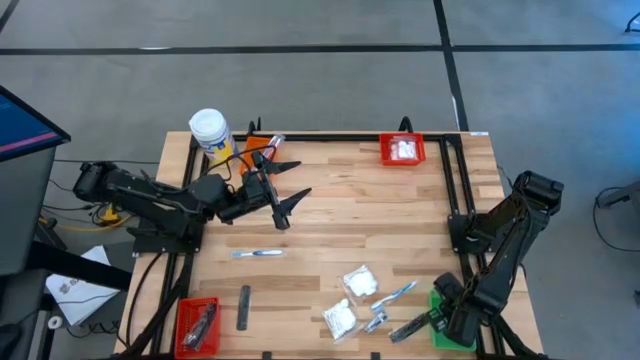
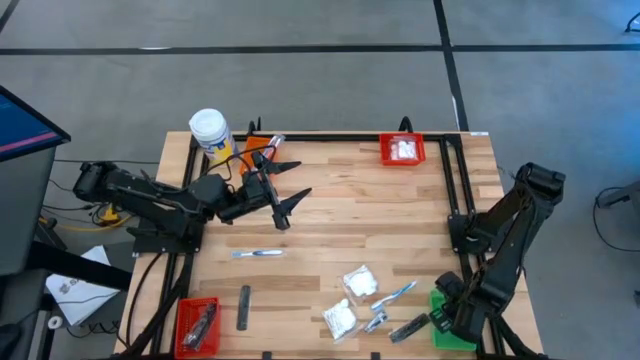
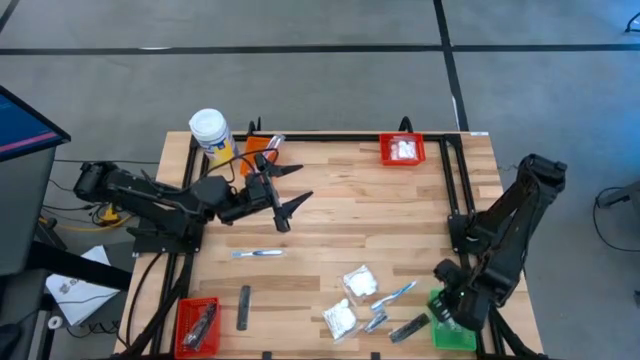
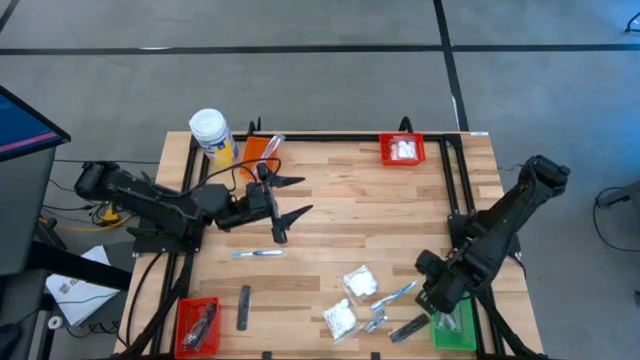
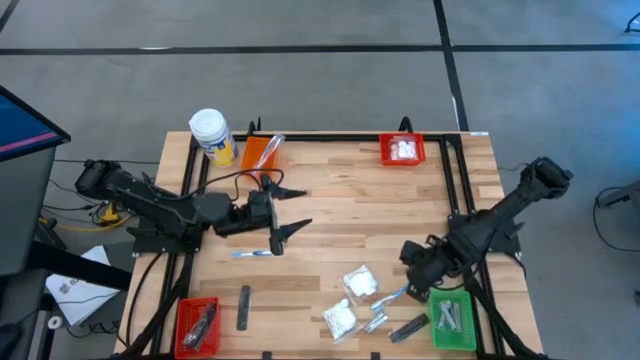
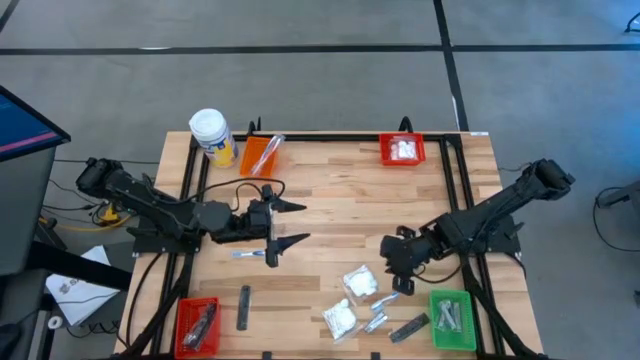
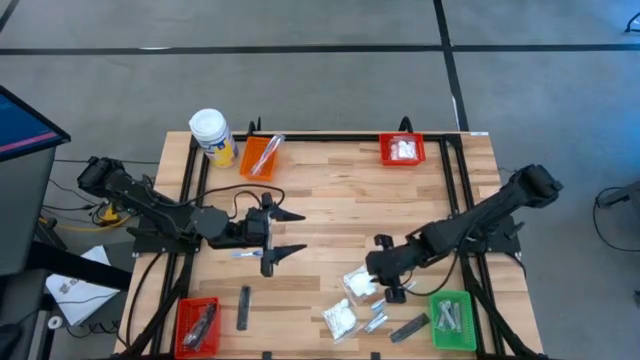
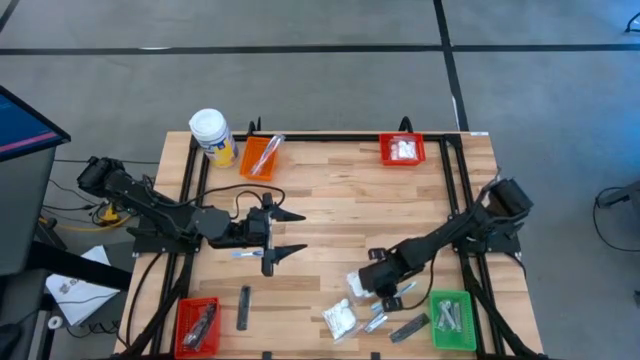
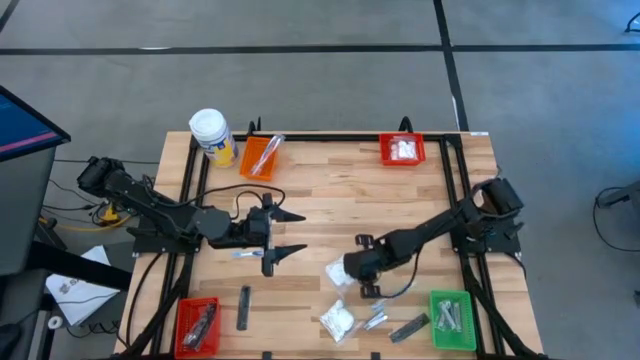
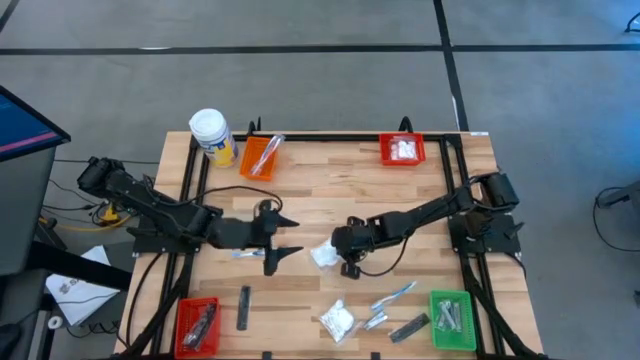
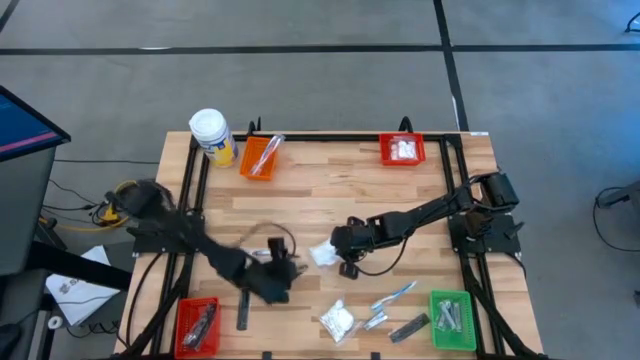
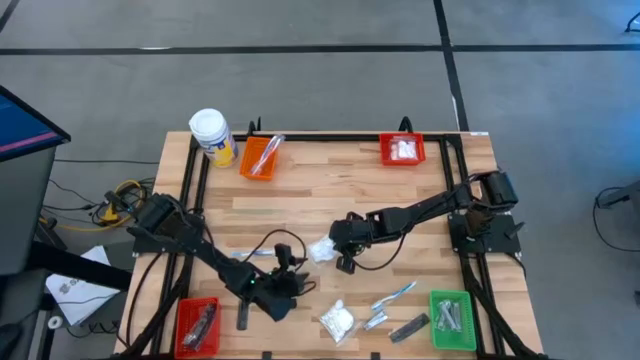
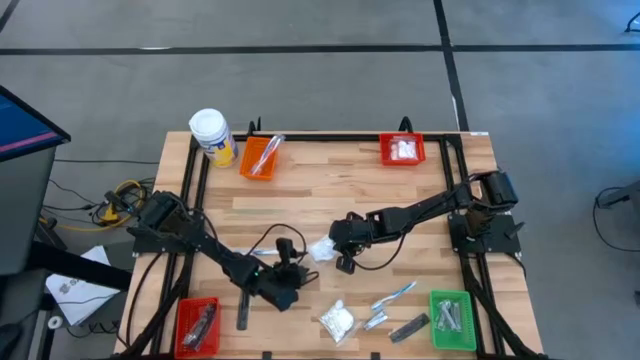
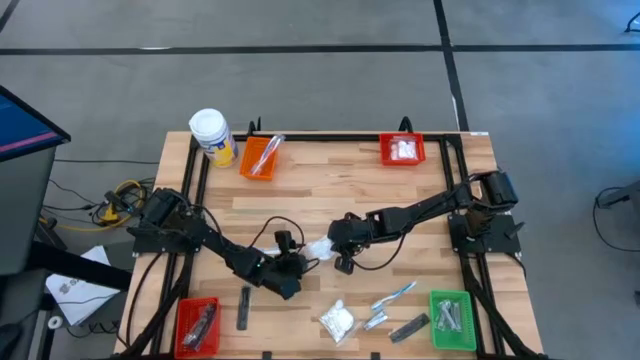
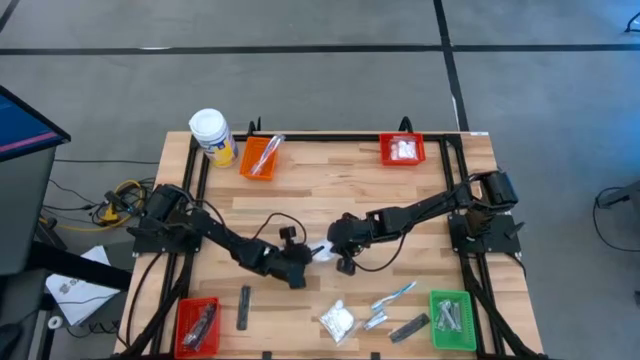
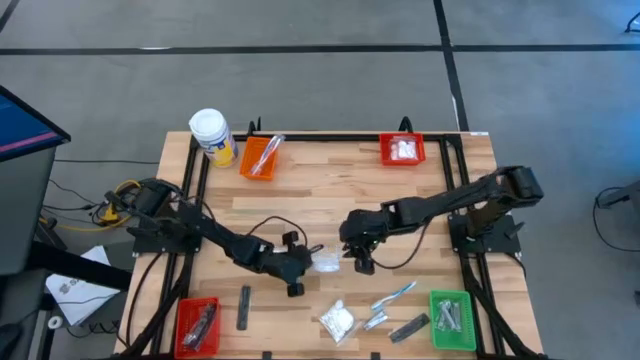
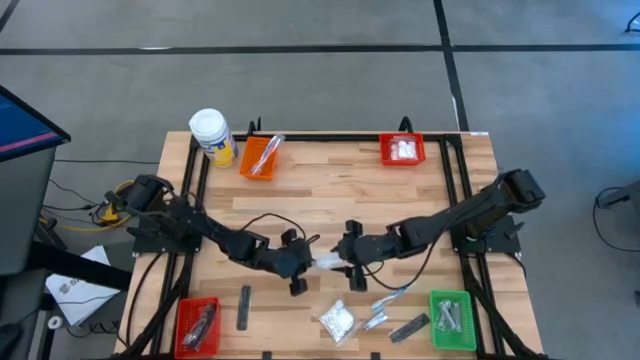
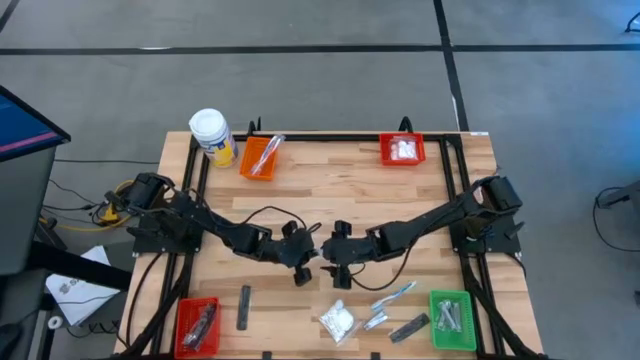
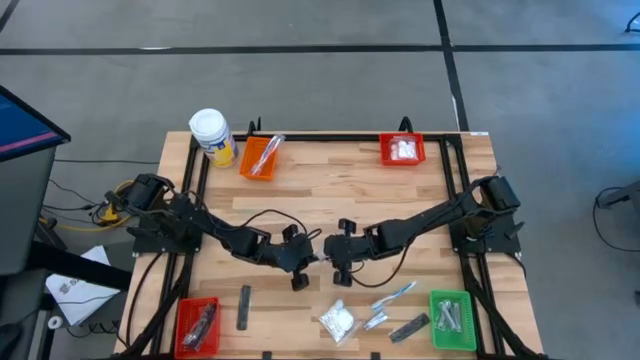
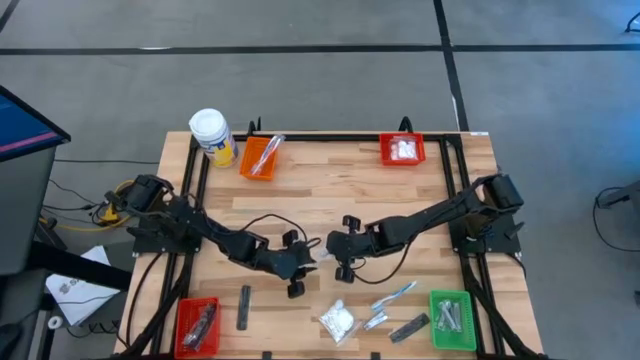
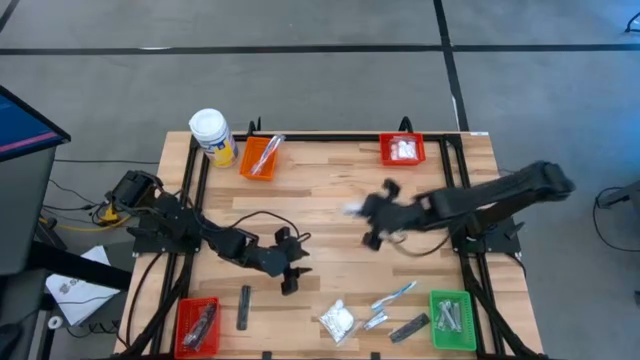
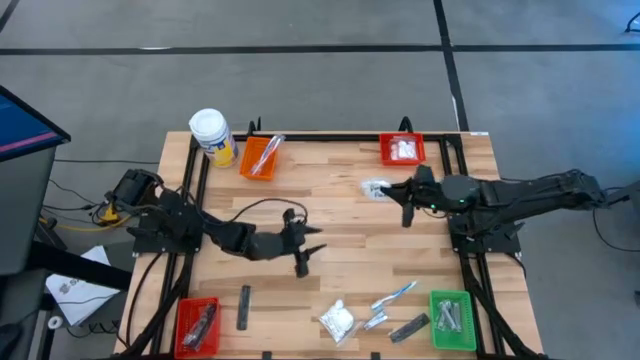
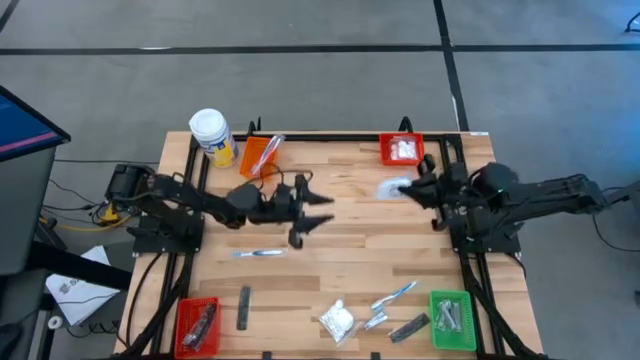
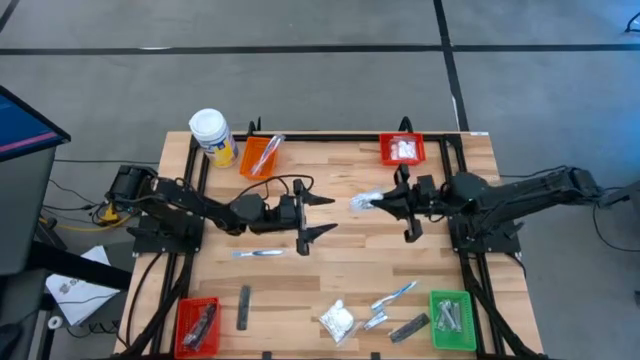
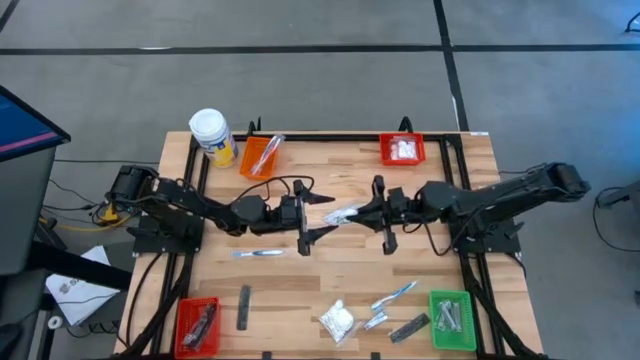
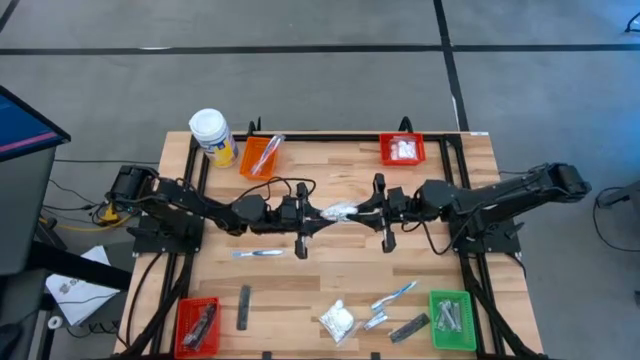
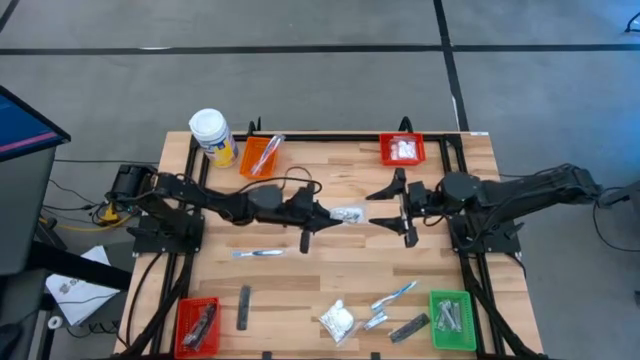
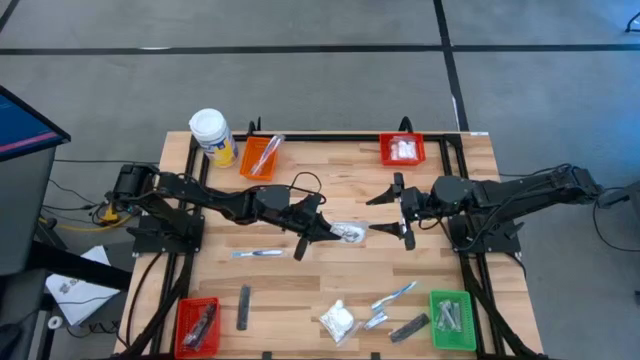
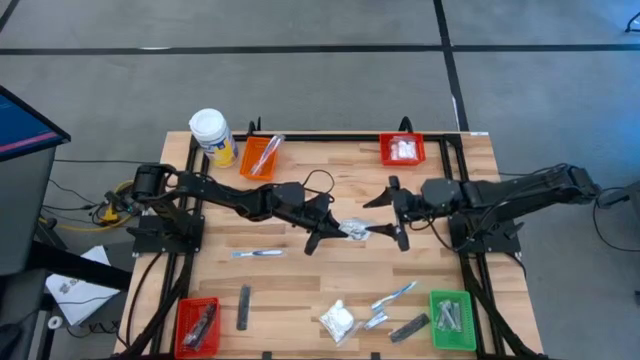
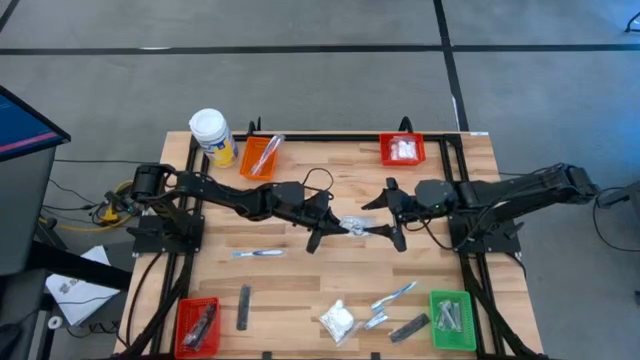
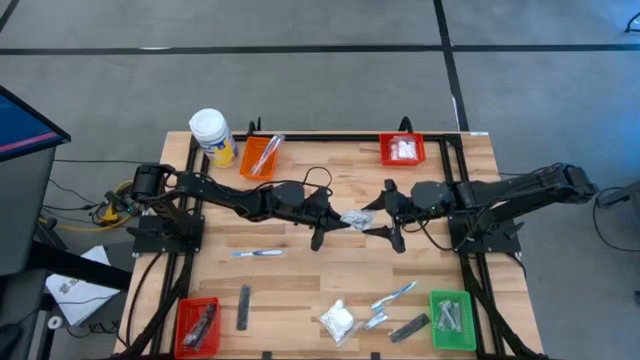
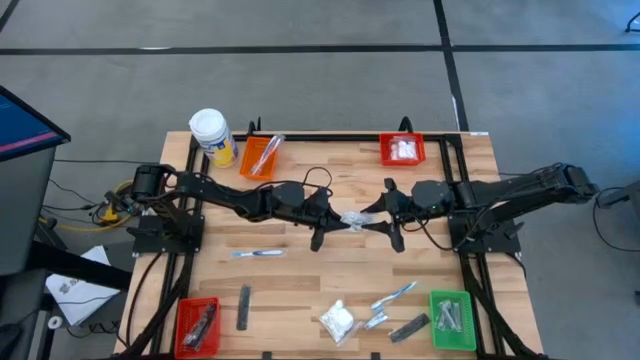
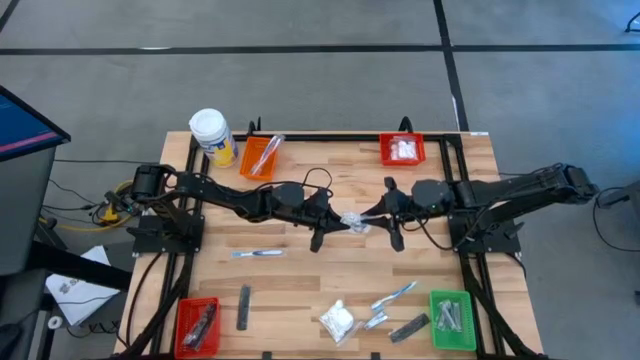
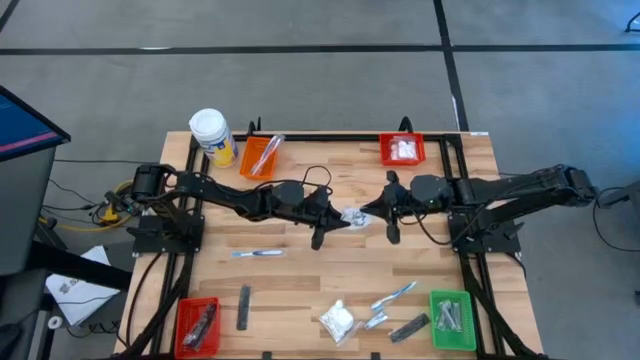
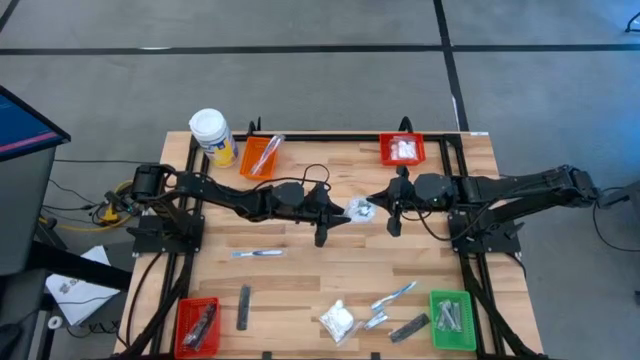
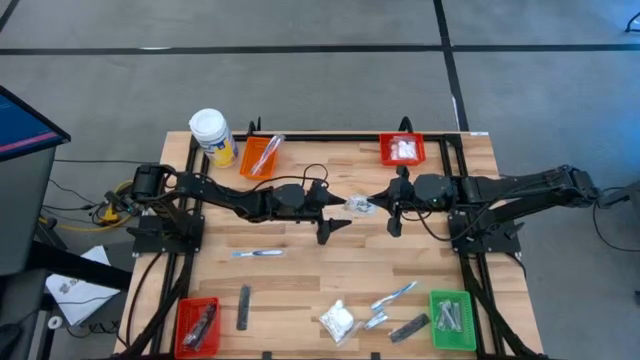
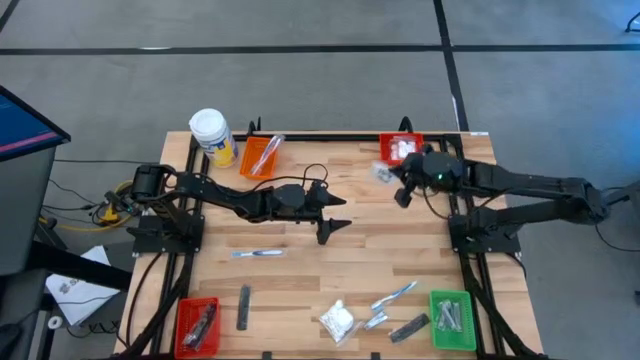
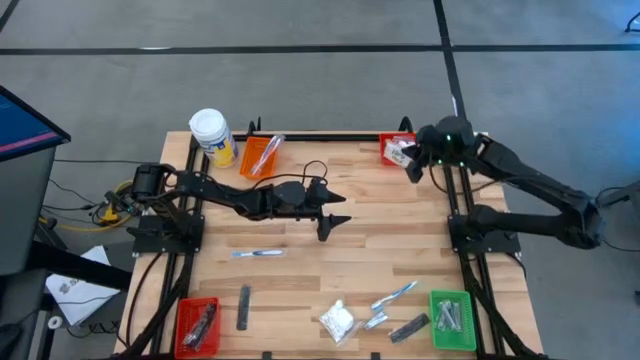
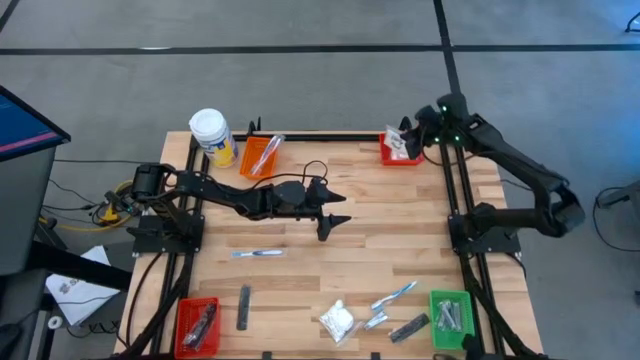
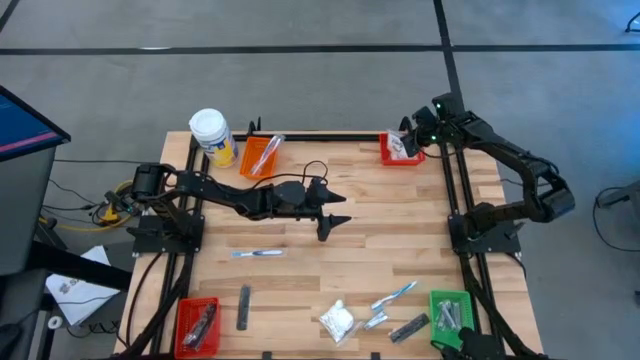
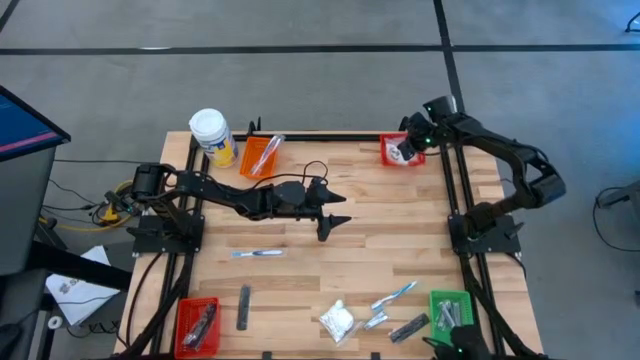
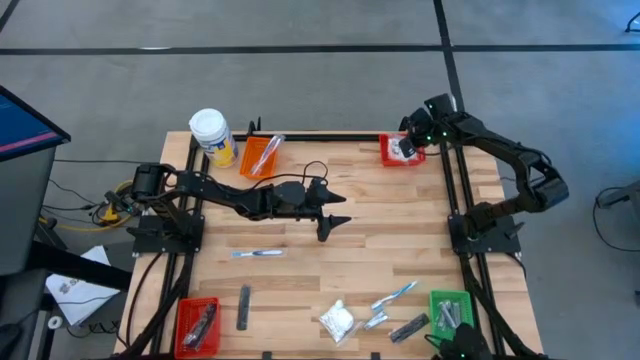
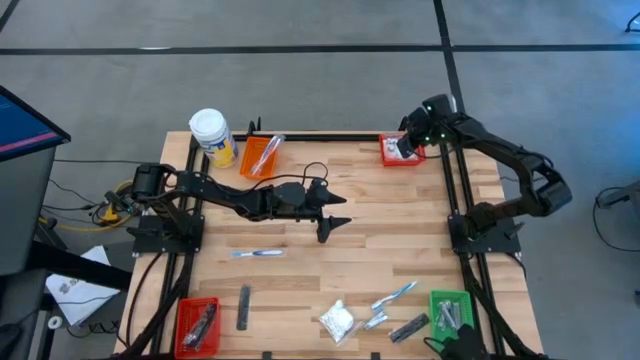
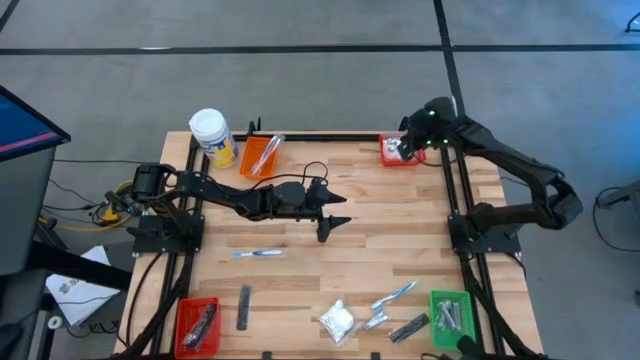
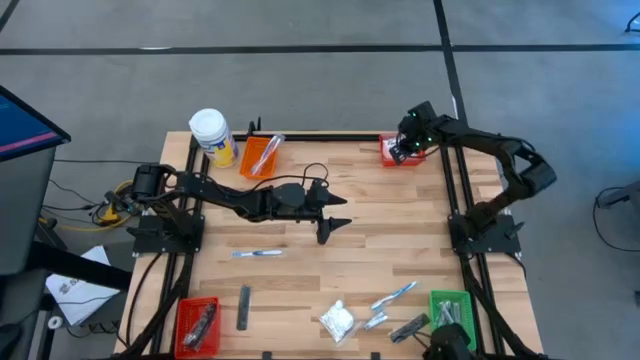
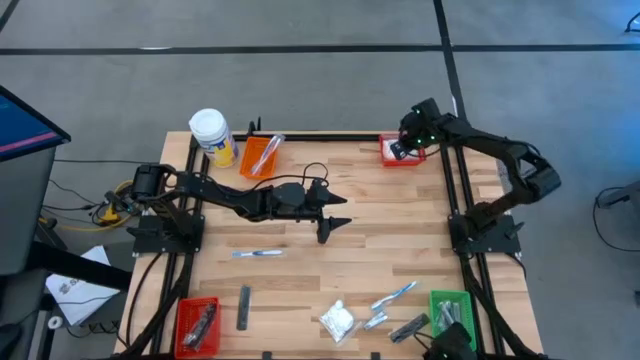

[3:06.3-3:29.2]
Task: Pick & Place Travel size toiletries
Put the top cotton pack into the top red bin
